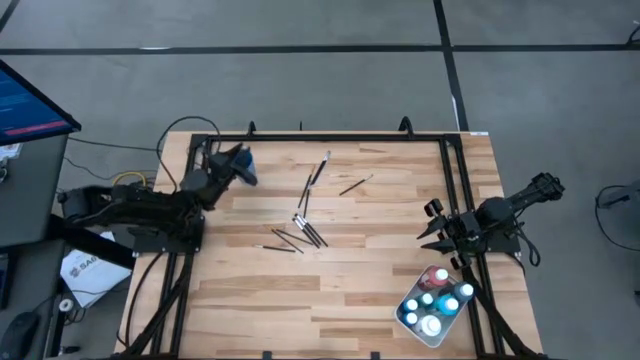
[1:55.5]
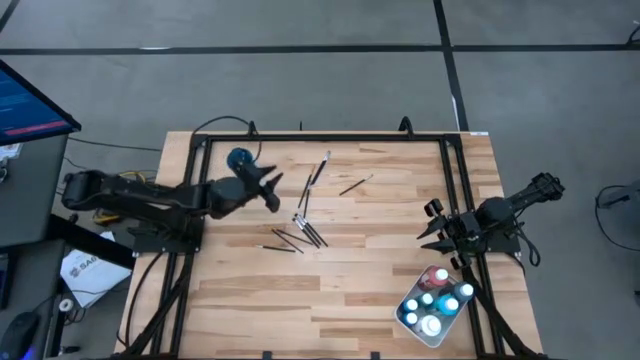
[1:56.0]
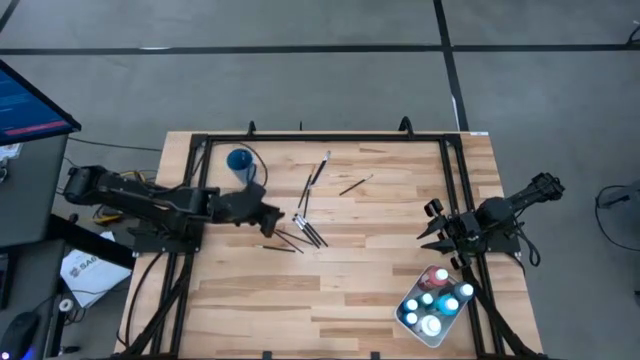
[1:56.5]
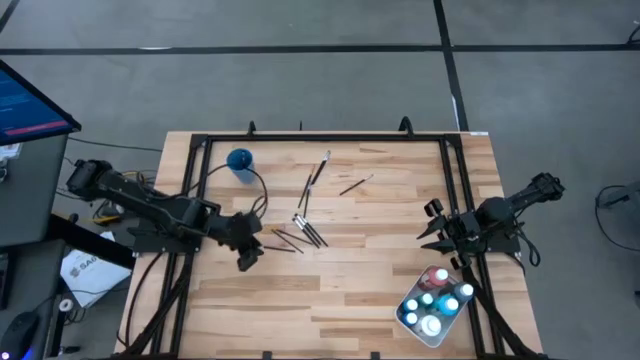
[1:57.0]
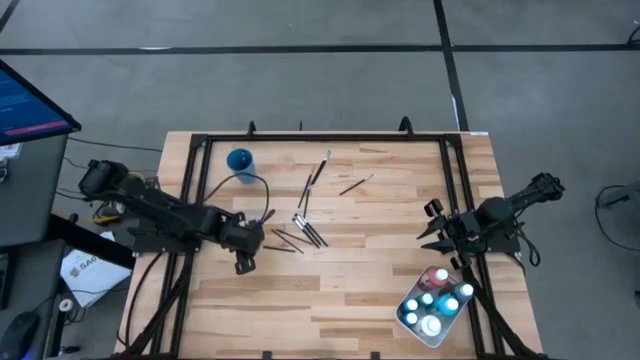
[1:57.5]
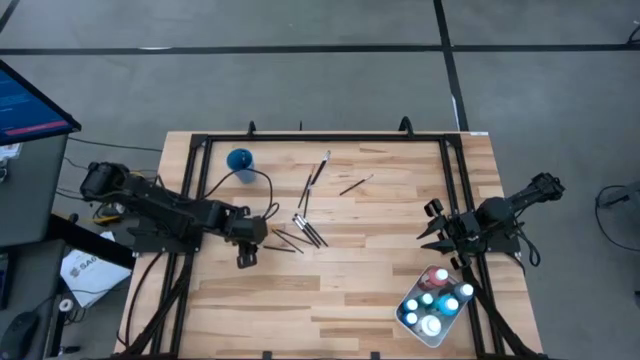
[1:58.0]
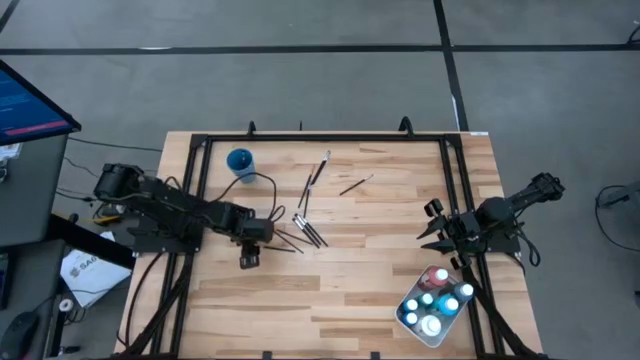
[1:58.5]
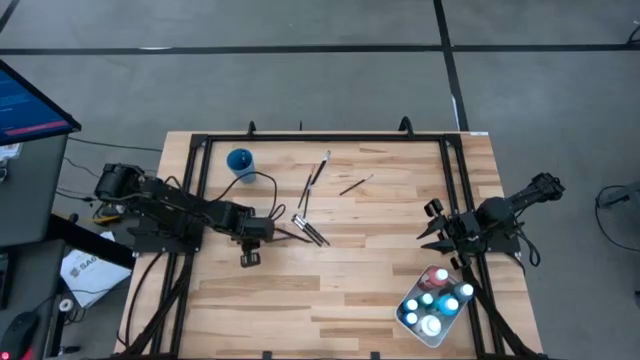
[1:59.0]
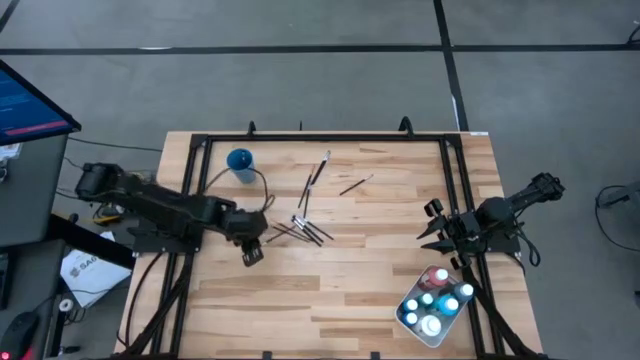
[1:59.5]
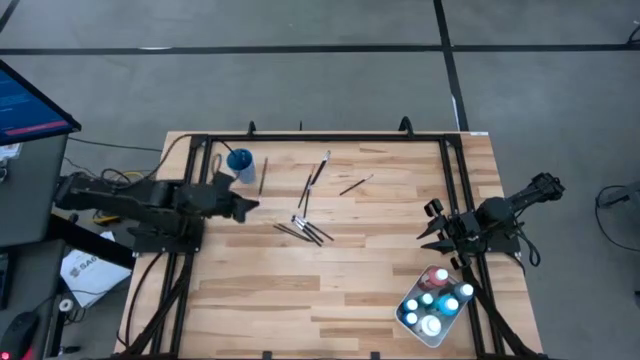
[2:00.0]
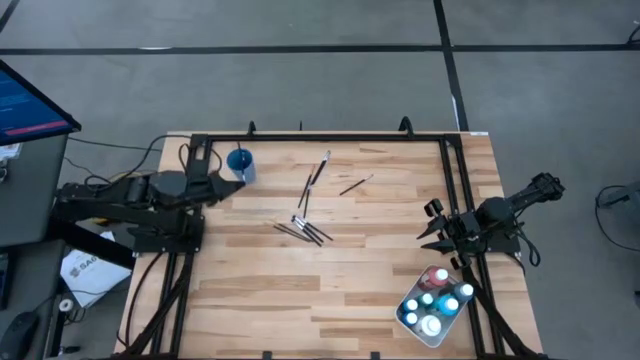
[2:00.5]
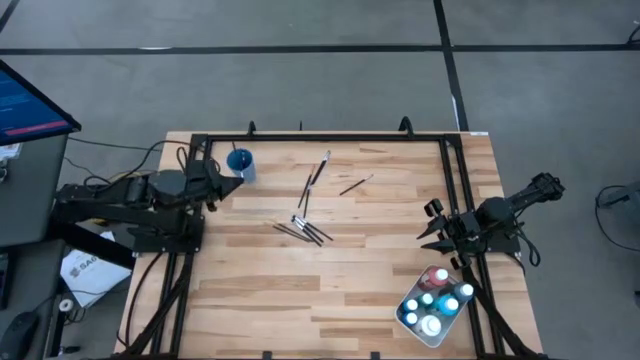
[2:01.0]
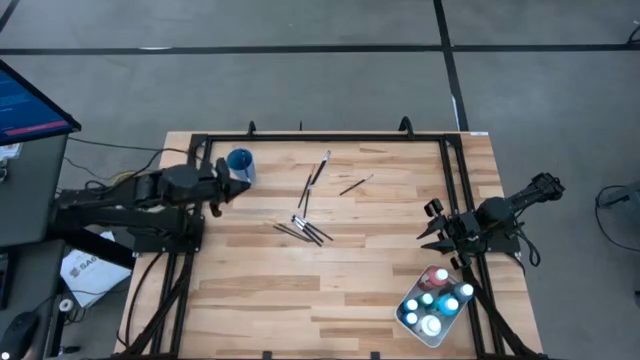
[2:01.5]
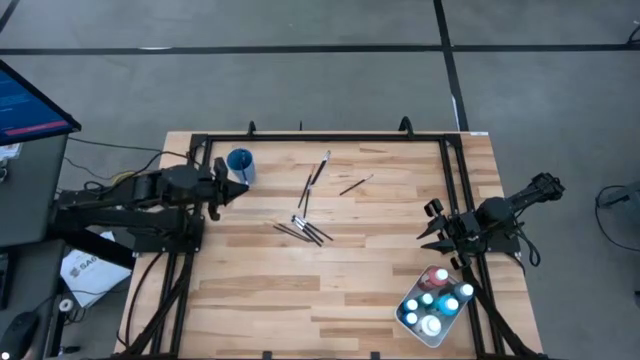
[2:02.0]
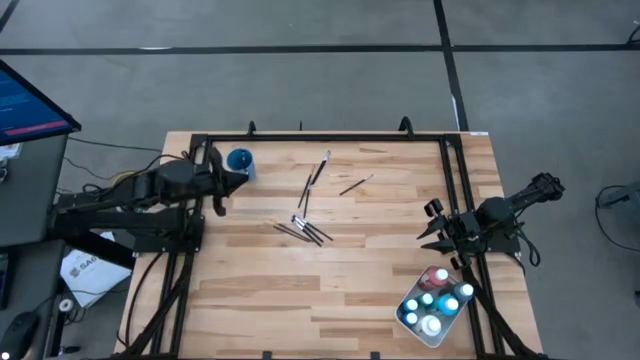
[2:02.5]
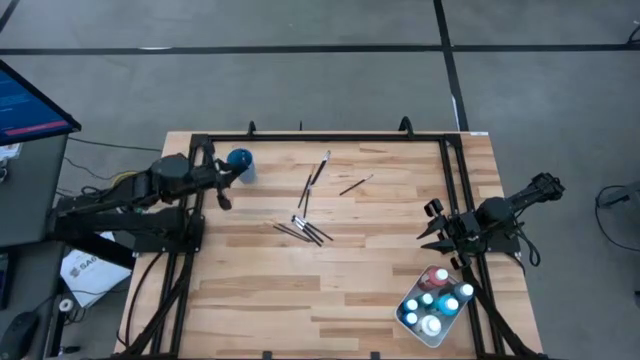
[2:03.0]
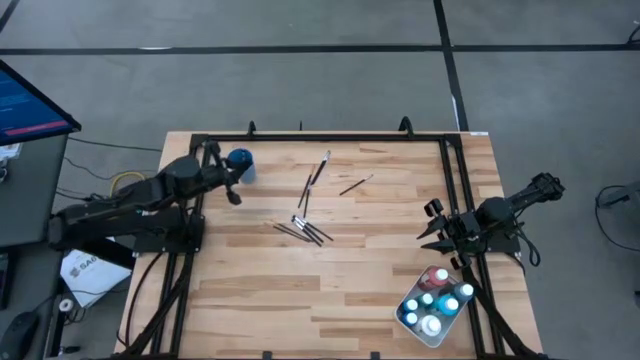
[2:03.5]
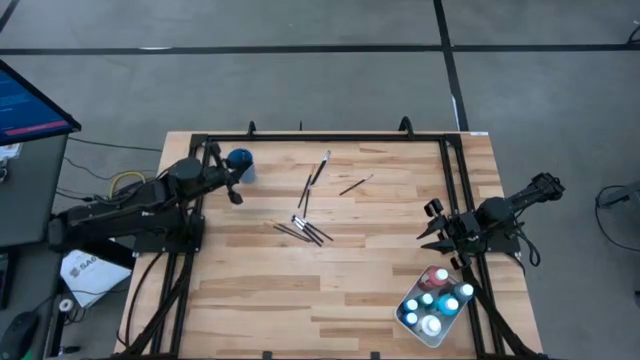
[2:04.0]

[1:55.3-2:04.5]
Task: Pick & Place Paint Supplies
Put the silver paint brush into the blue cup

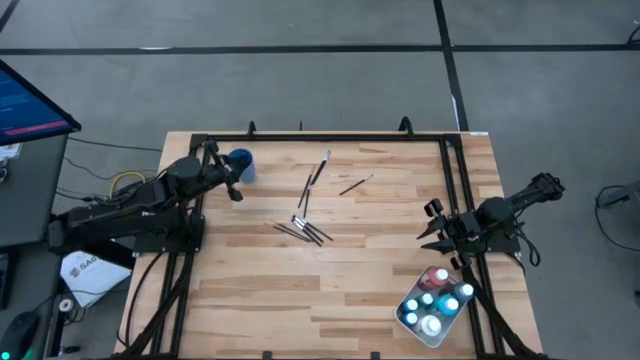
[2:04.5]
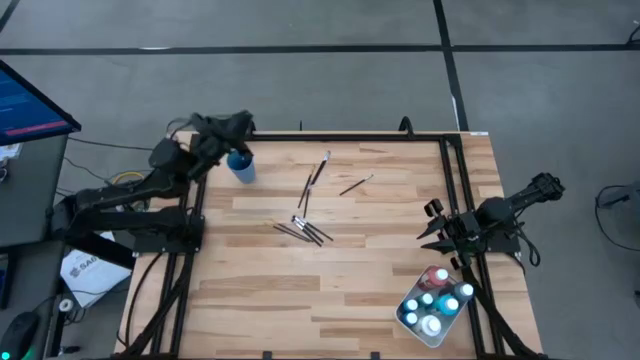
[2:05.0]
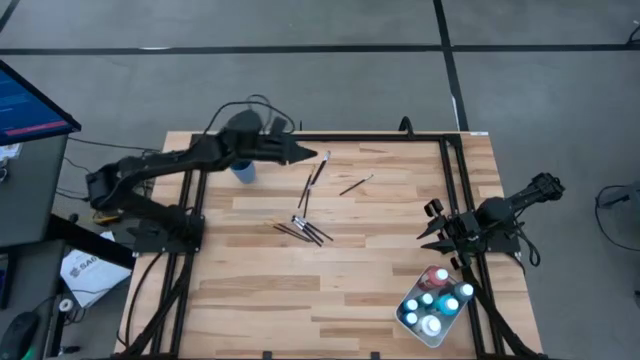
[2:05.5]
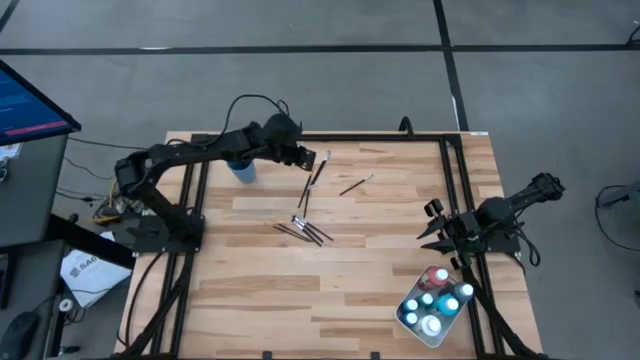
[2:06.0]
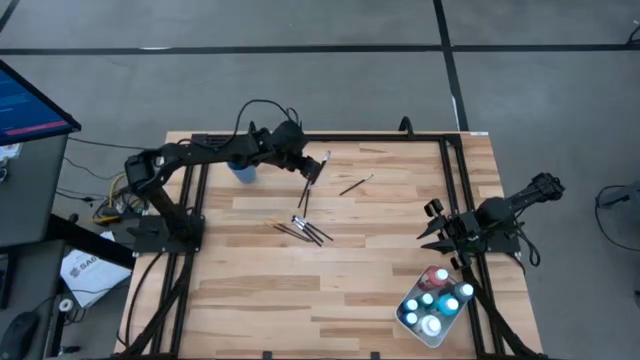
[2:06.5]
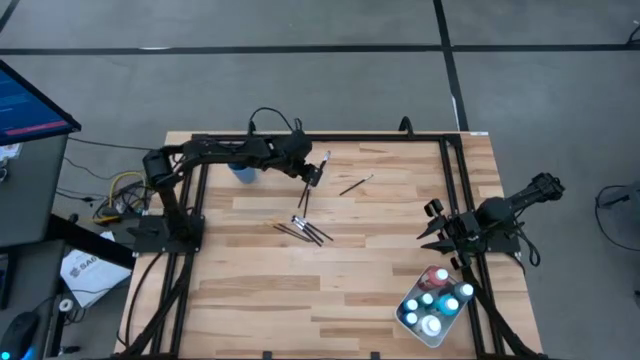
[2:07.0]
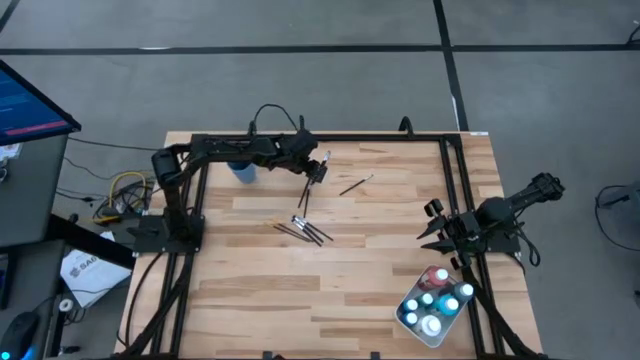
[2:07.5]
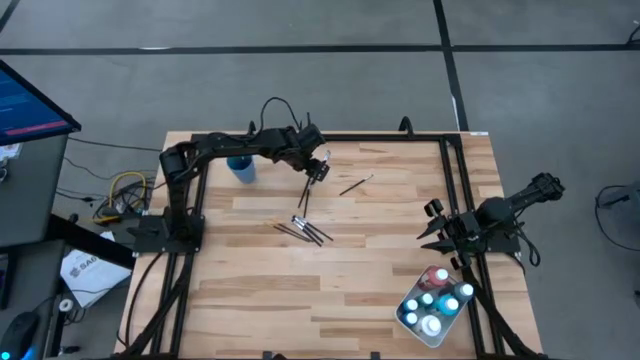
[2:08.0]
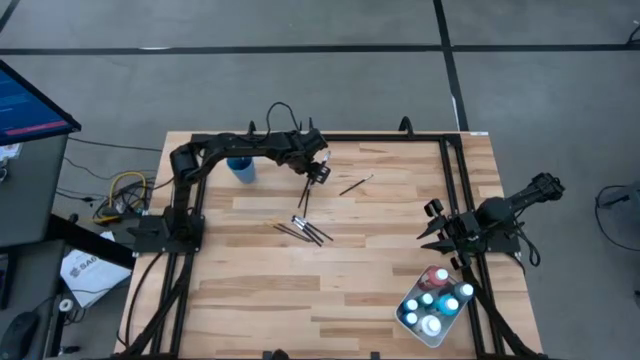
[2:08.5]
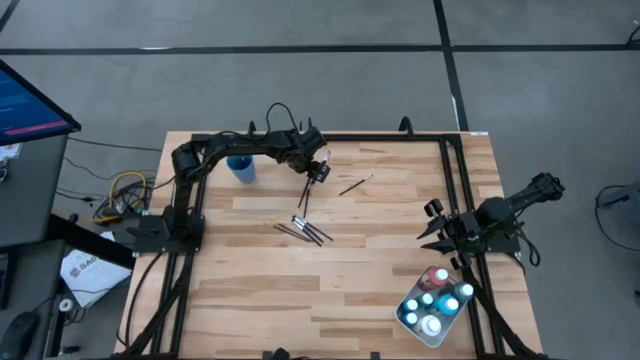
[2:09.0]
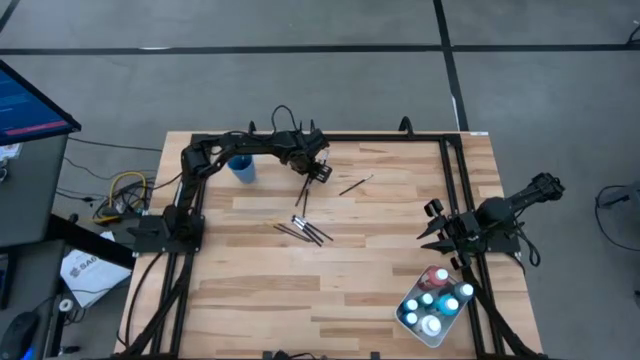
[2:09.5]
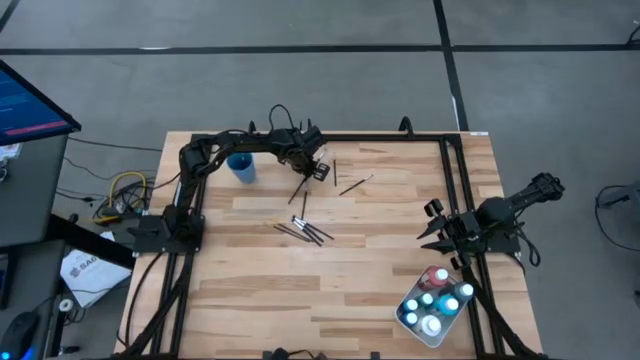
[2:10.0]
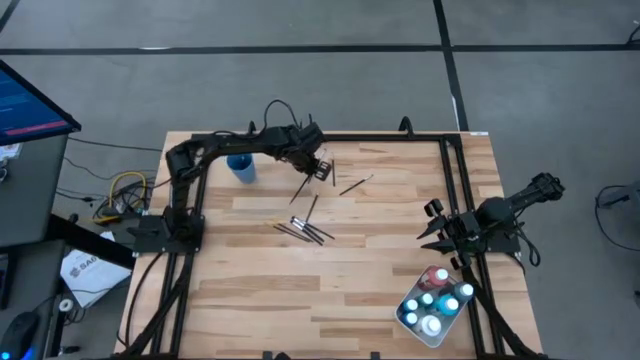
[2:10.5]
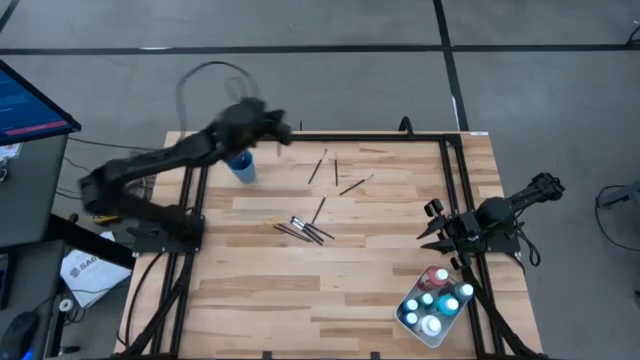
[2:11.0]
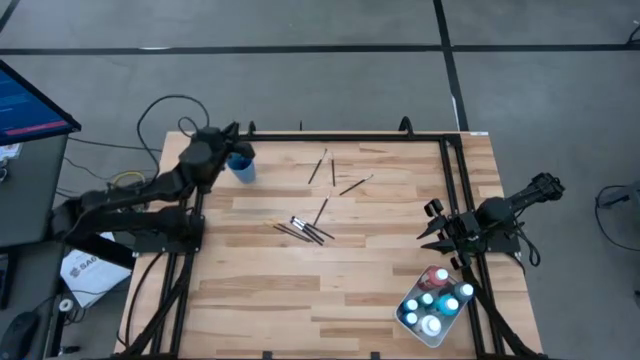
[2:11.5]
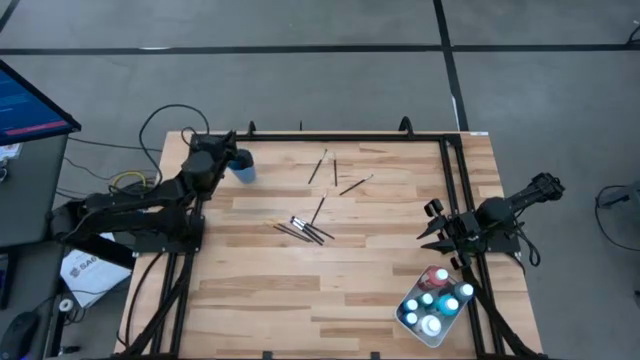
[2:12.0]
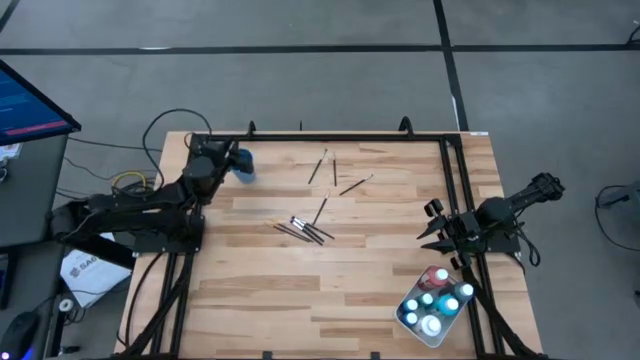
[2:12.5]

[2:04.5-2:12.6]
Put the top gold paint brush into the blue cup

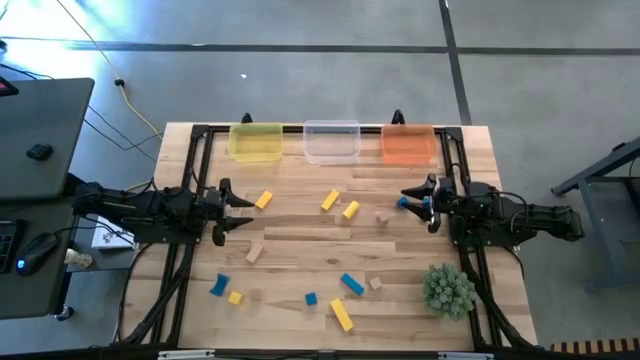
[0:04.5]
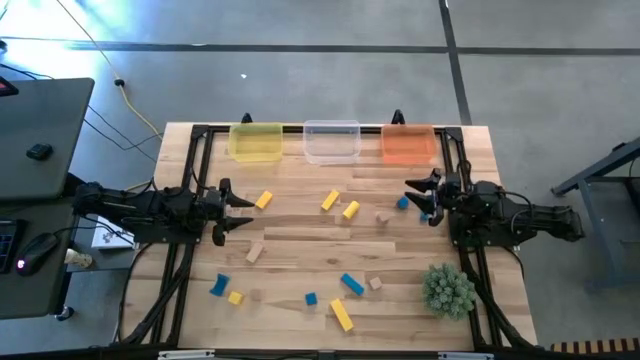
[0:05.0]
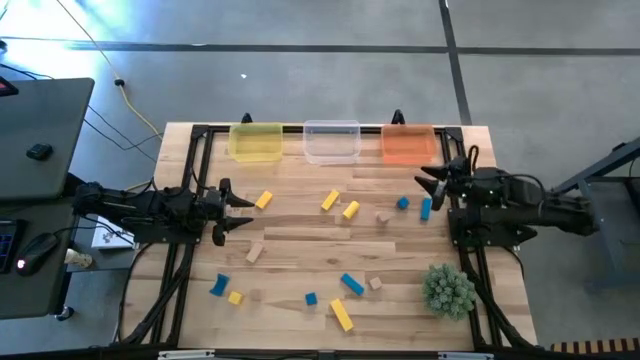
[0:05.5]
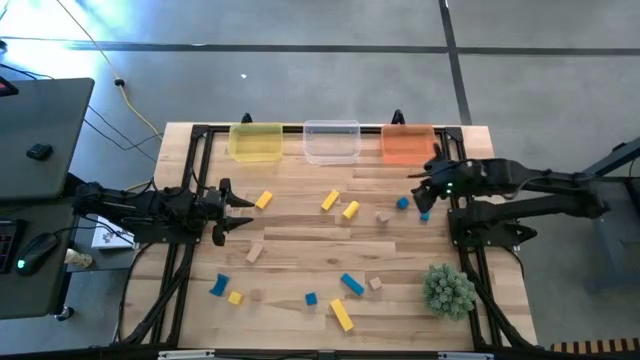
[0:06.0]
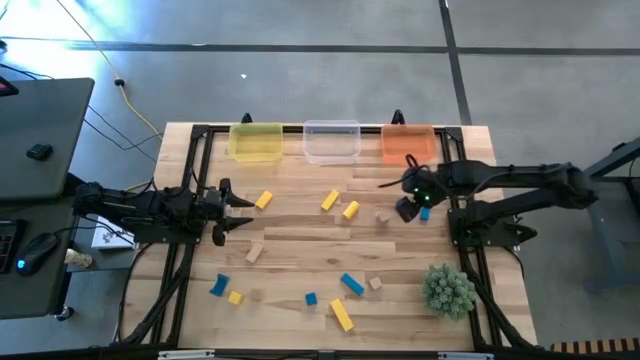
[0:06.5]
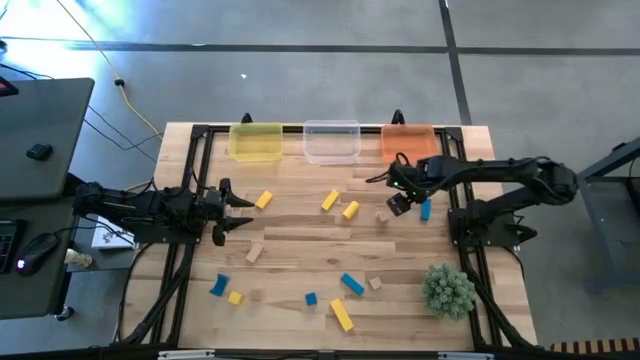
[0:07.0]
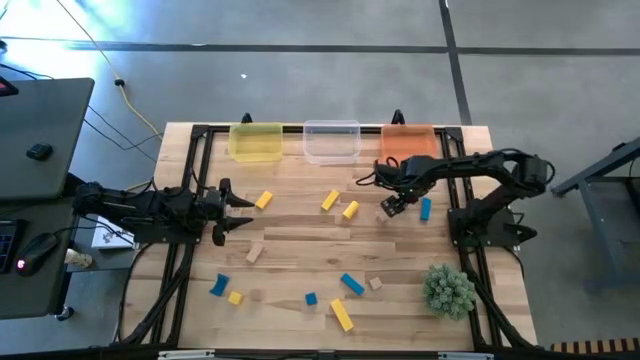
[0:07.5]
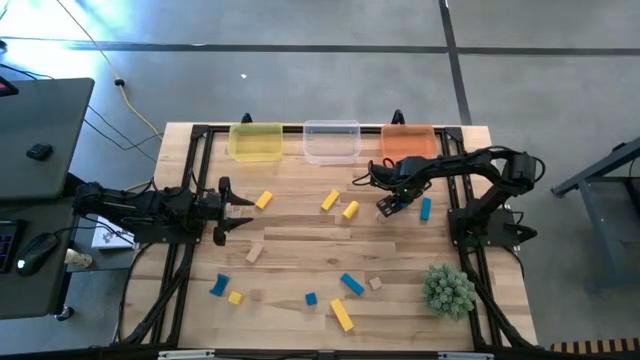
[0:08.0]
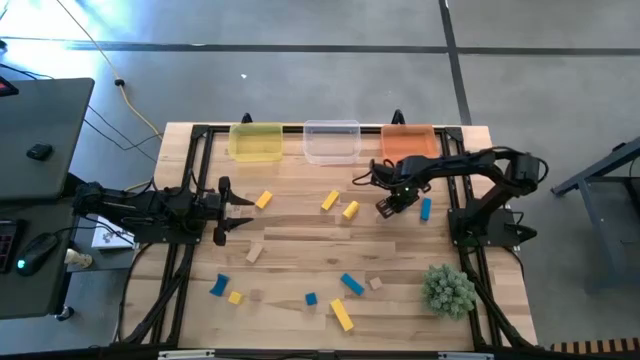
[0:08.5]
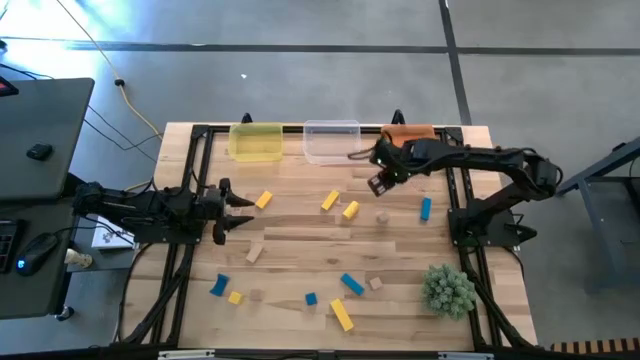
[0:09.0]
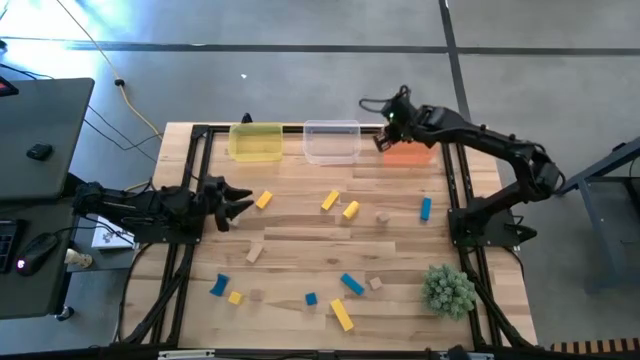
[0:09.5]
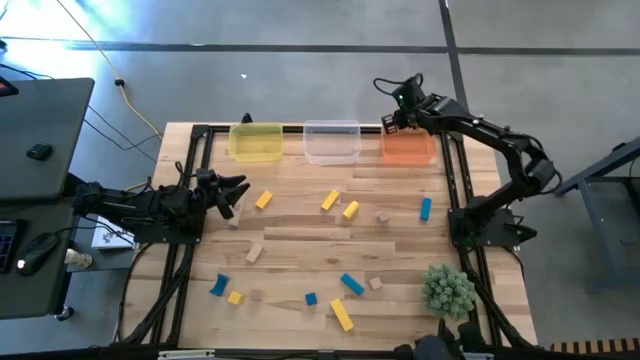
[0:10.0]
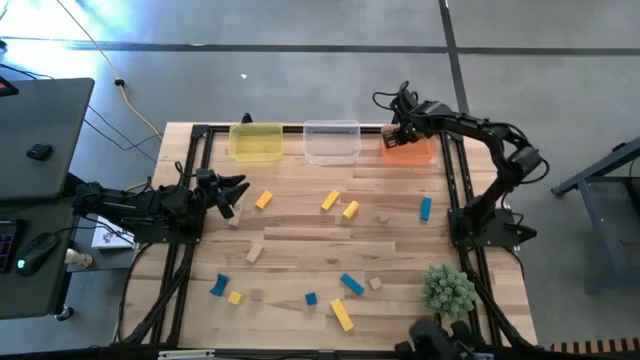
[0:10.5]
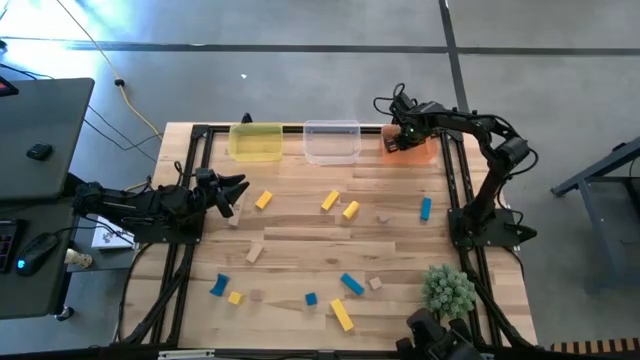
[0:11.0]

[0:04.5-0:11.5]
Task: Sort & place blocks by color
Put the blue block into the orange bin
